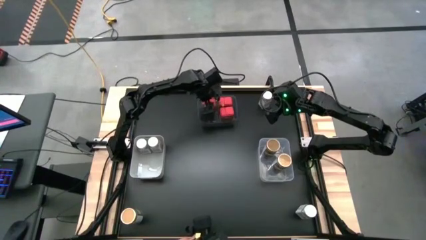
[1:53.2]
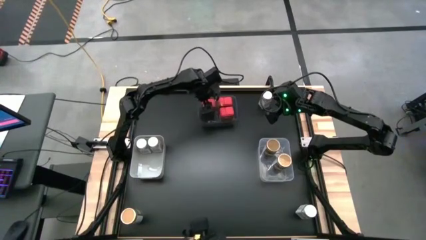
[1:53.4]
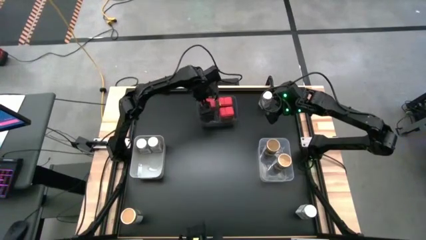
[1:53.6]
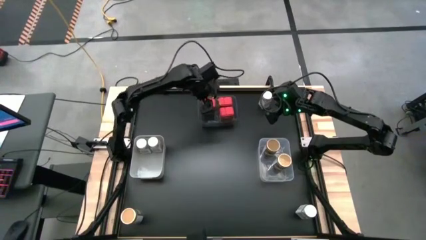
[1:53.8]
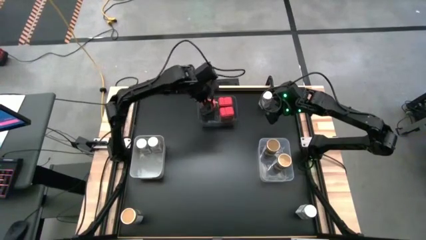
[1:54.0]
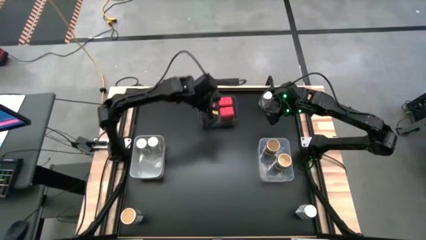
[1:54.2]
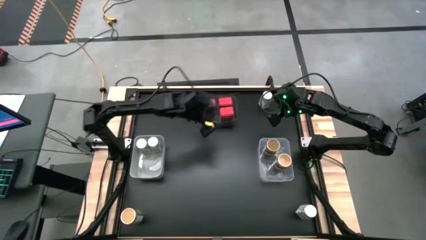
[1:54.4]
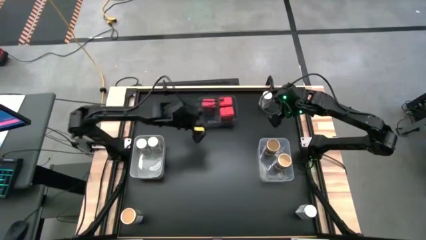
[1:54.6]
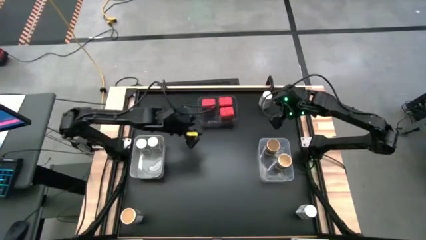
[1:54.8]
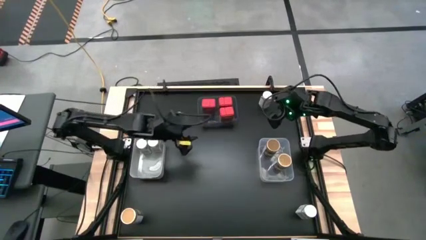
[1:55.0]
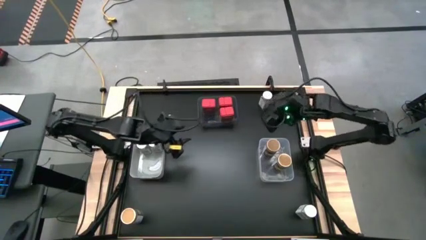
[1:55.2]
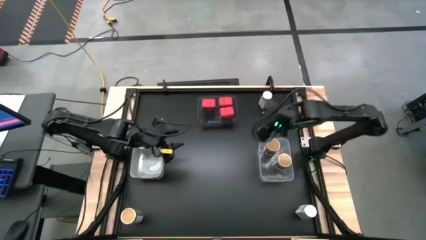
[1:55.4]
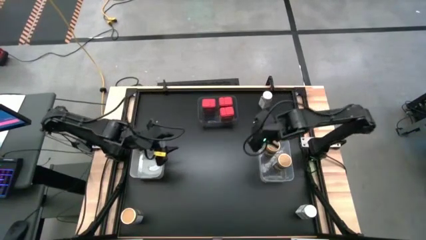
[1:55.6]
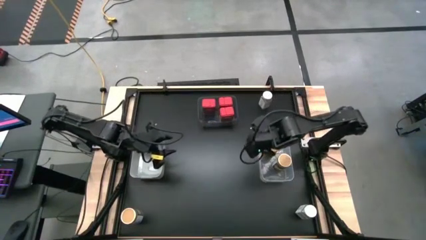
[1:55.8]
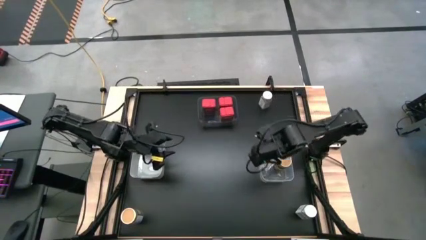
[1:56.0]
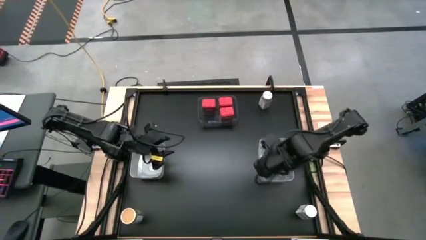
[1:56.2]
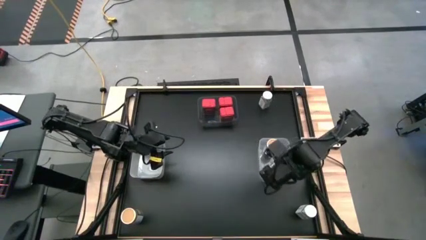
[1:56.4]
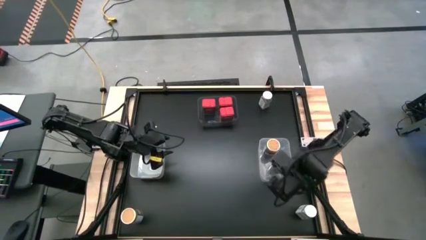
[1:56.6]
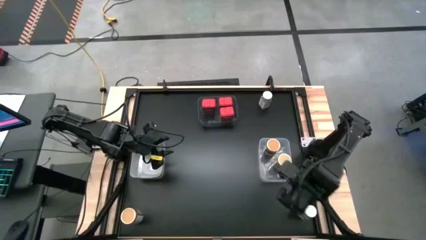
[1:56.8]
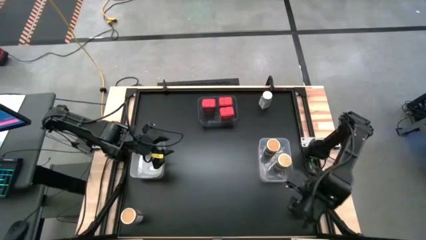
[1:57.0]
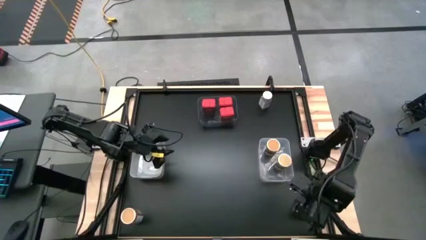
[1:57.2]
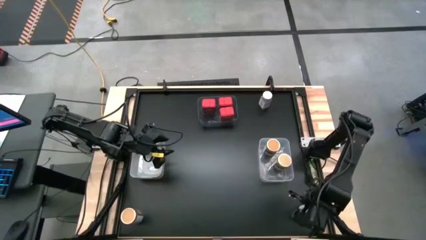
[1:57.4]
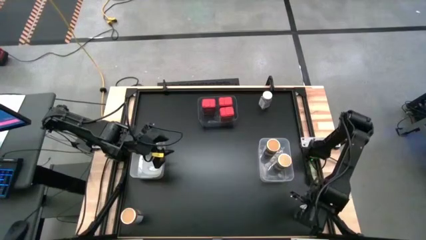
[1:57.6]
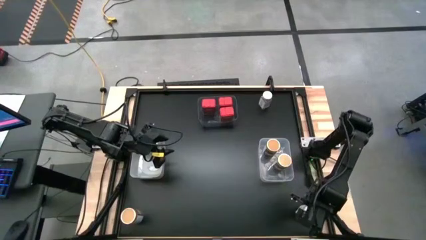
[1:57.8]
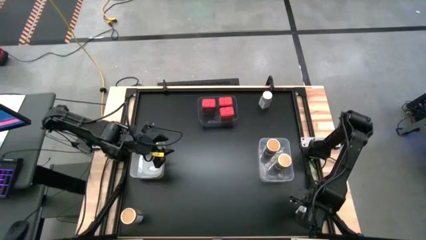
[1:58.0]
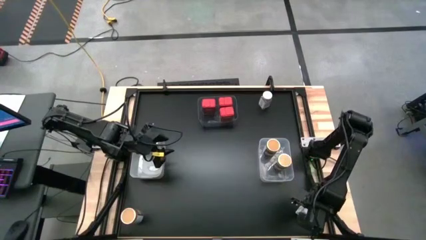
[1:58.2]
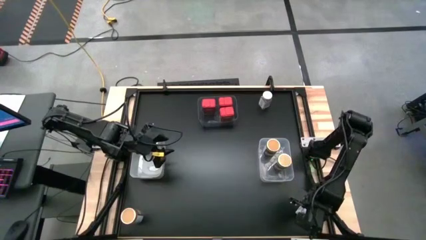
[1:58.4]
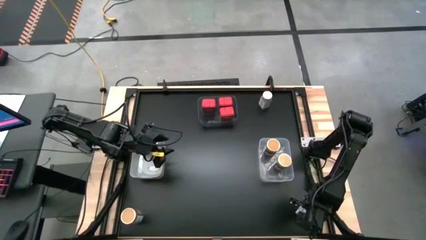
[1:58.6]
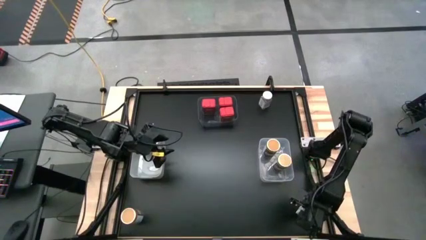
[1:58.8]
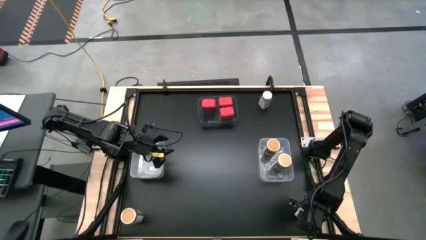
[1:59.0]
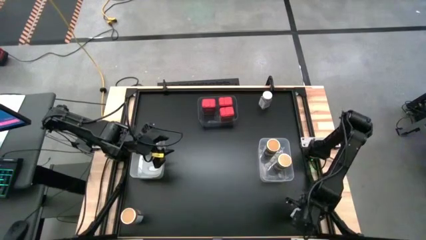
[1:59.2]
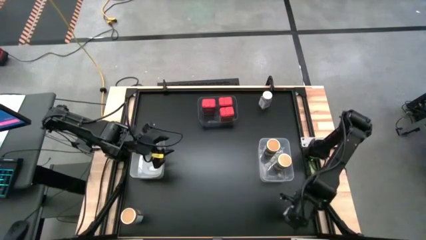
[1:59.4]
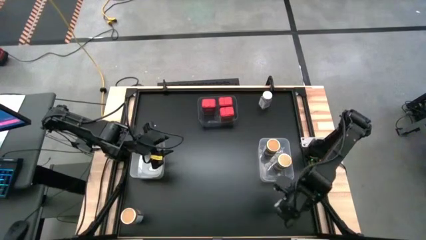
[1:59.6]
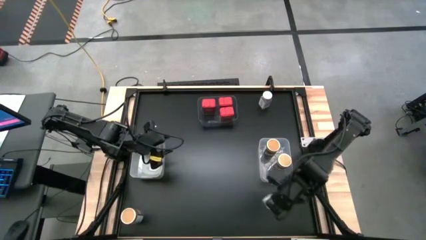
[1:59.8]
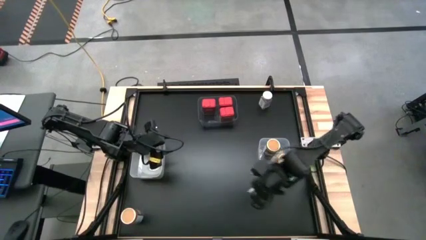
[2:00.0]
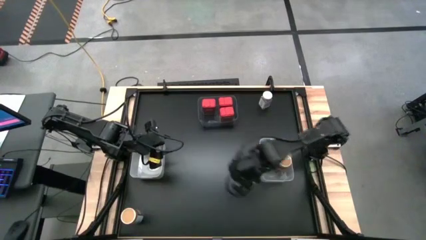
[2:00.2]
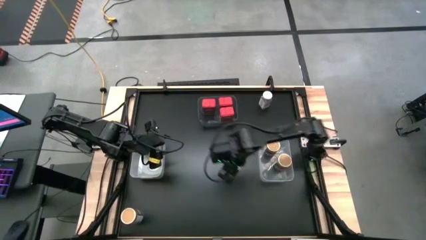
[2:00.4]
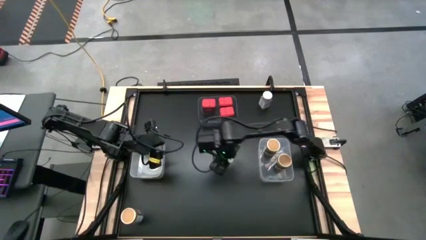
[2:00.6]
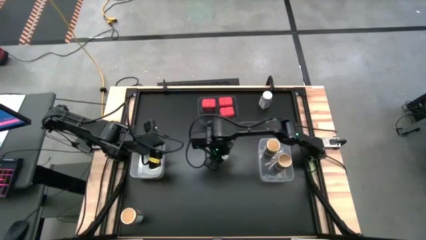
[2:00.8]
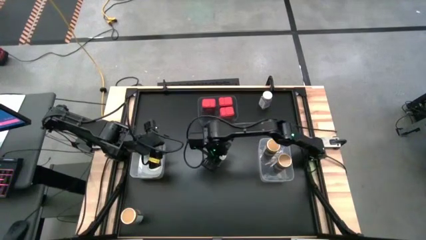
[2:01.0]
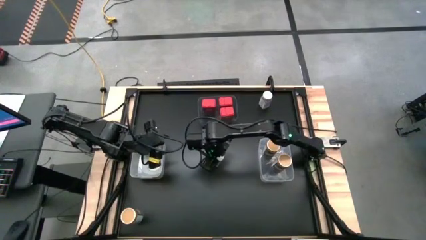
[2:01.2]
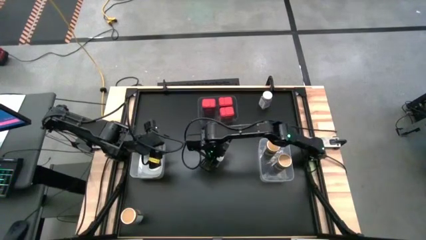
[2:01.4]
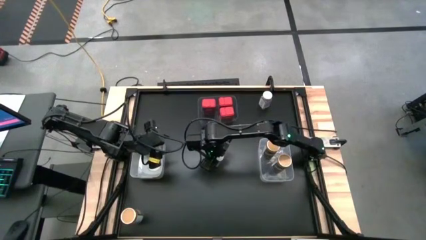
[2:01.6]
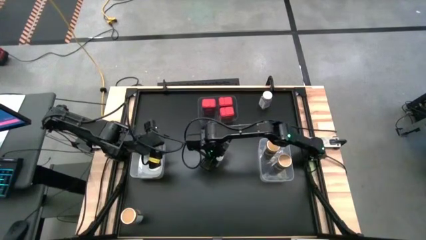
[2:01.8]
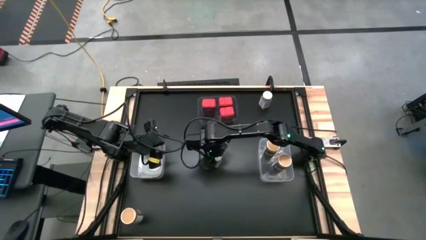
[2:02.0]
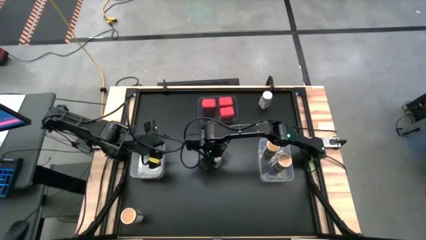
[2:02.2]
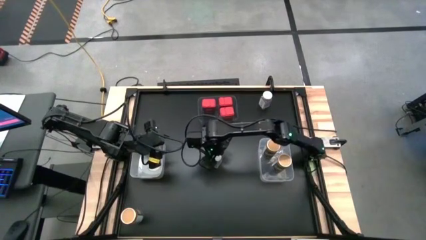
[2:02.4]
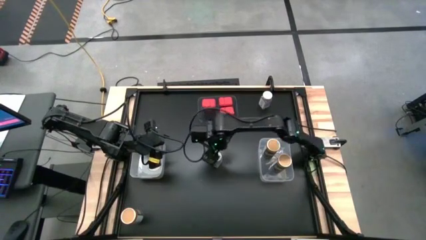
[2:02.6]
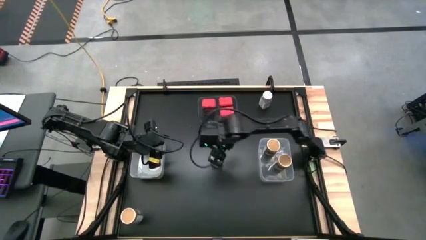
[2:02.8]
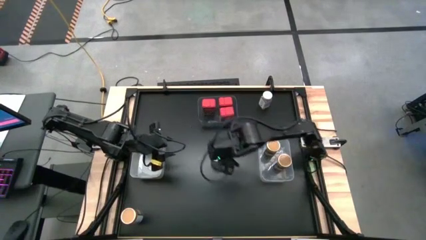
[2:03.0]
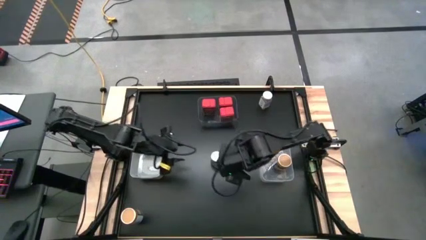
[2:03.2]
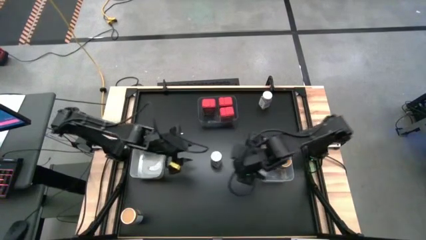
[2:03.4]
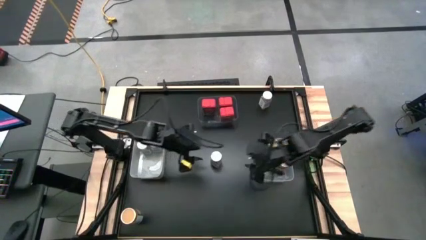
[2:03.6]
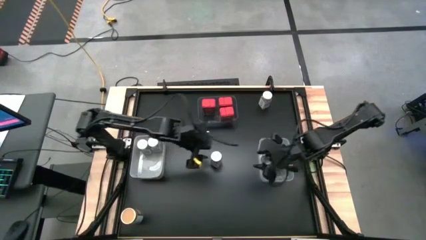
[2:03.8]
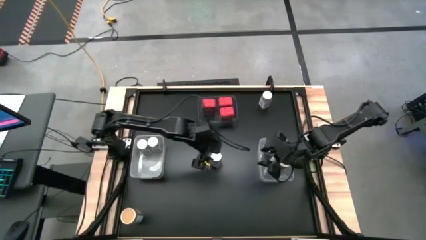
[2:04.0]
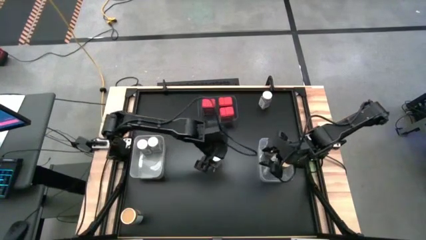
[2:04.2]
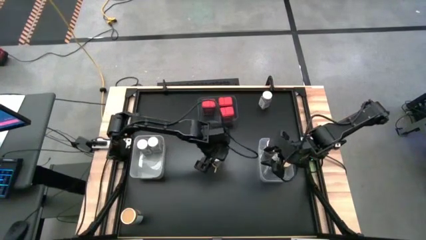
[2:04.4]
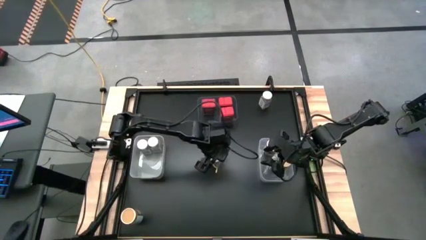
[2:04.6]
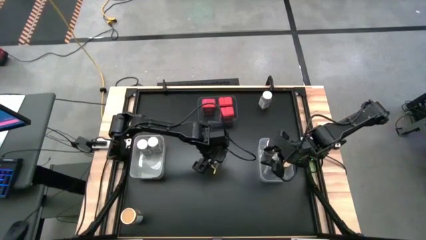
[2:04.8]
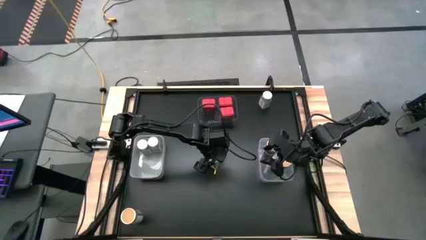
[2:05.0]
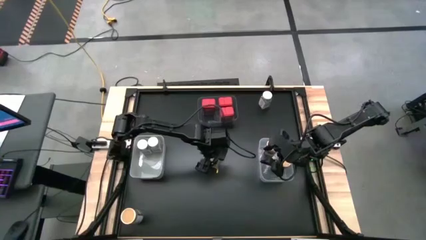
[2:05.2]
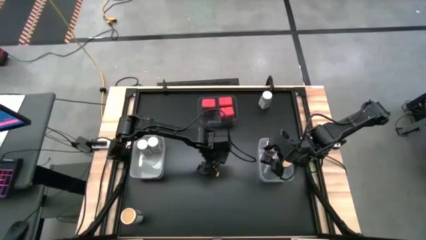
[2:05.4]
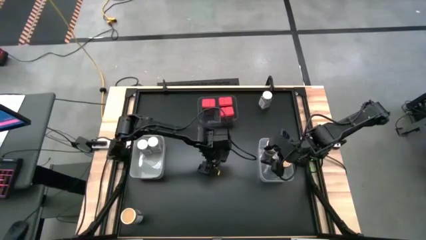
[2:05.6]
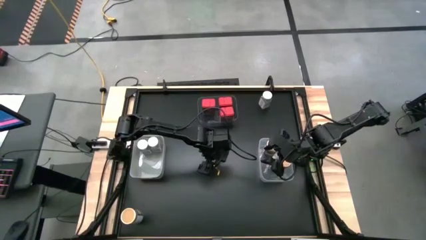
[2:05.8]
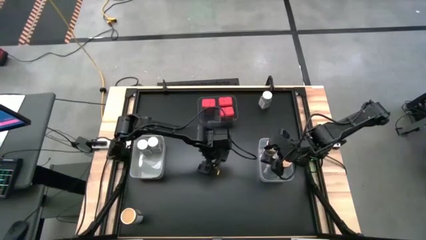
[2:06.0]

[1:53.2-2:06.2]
Task: Sort spices by type
Put the bottom white seasoning bottle into the white bin
